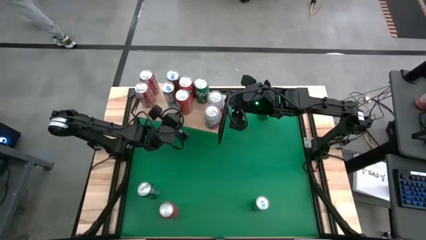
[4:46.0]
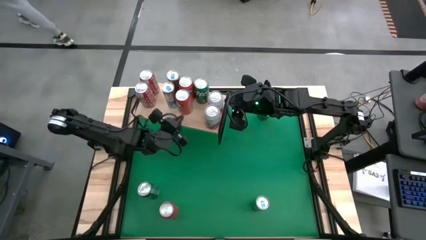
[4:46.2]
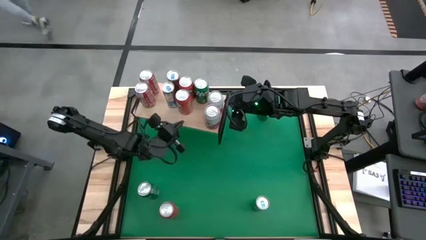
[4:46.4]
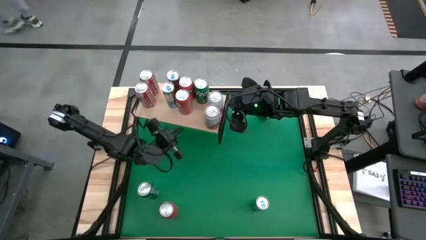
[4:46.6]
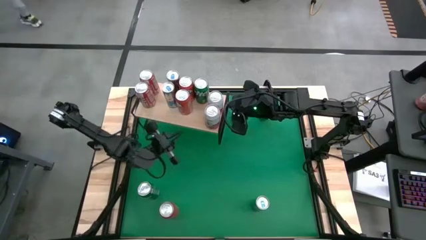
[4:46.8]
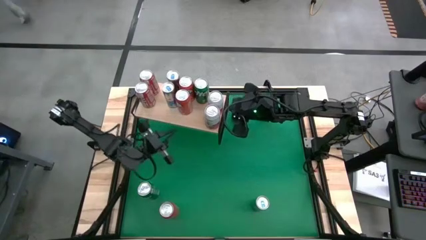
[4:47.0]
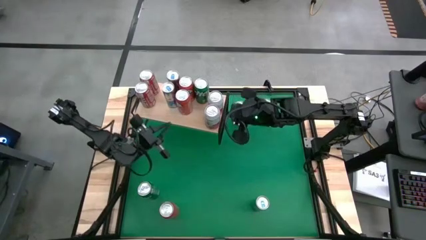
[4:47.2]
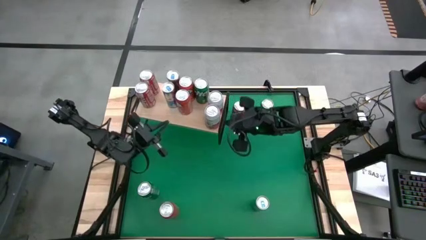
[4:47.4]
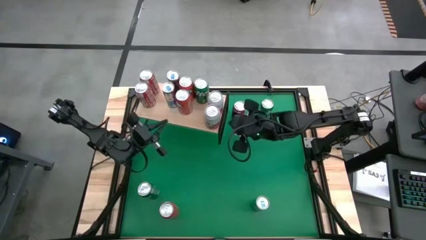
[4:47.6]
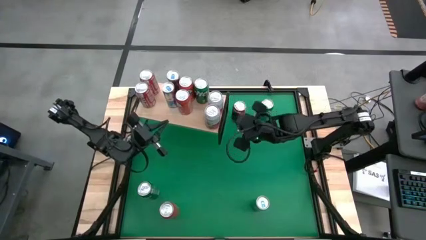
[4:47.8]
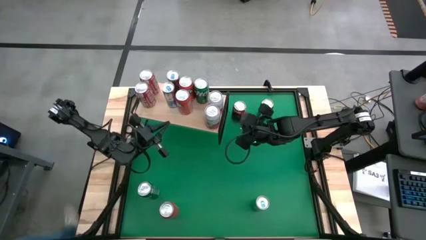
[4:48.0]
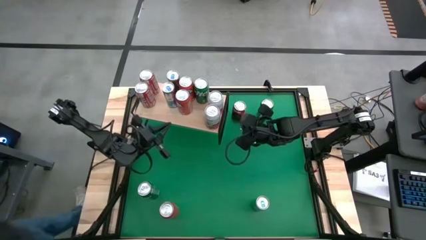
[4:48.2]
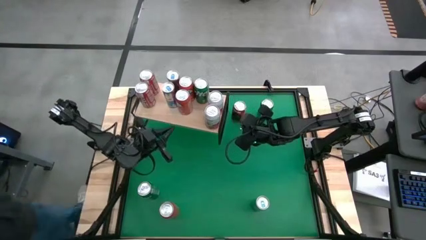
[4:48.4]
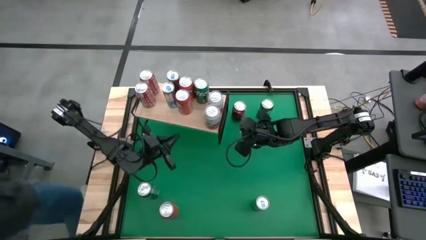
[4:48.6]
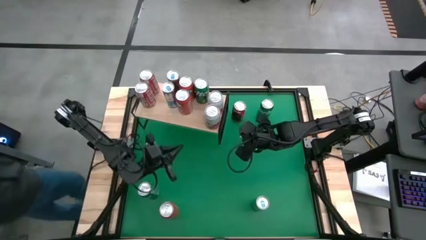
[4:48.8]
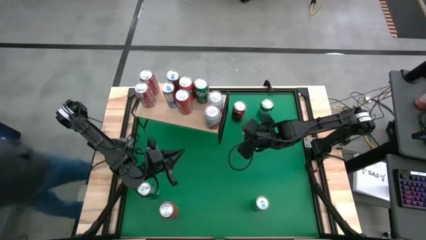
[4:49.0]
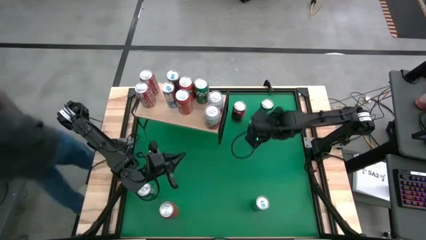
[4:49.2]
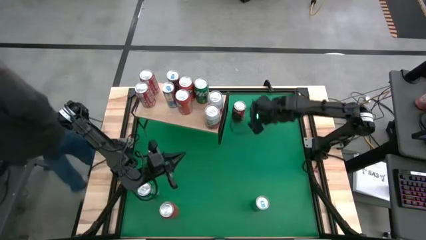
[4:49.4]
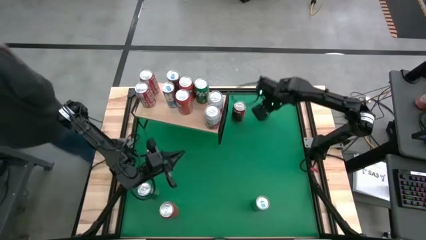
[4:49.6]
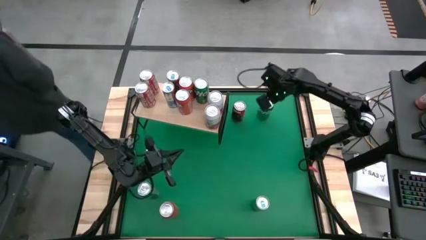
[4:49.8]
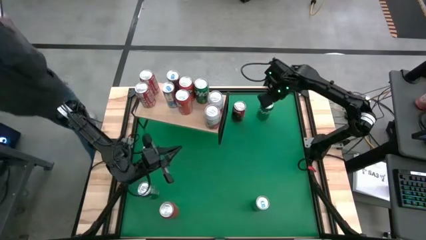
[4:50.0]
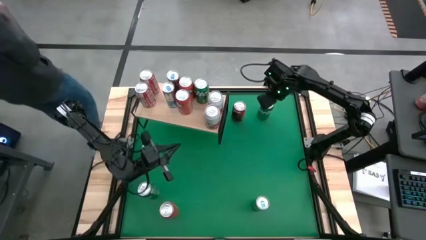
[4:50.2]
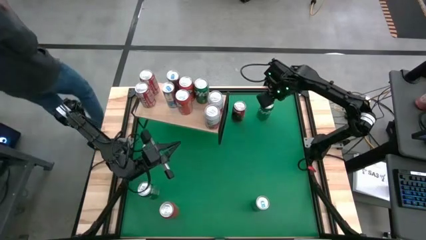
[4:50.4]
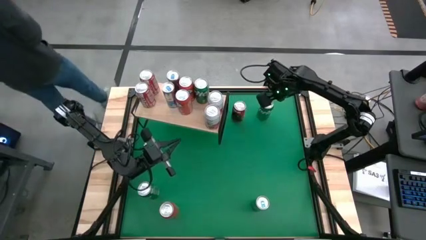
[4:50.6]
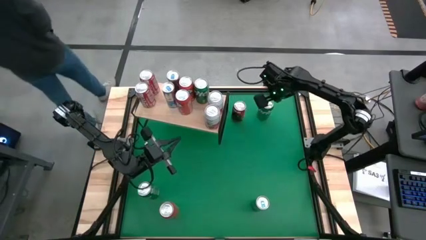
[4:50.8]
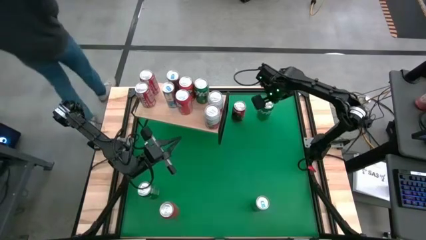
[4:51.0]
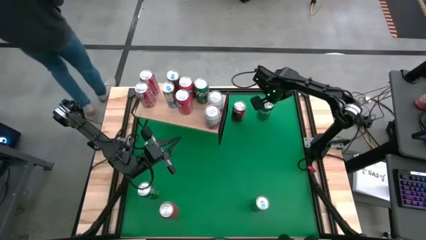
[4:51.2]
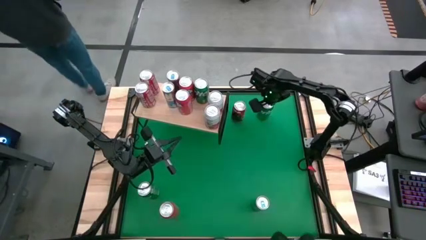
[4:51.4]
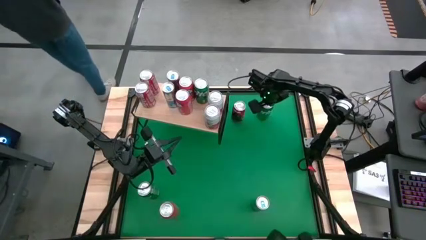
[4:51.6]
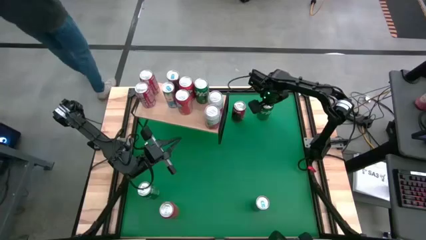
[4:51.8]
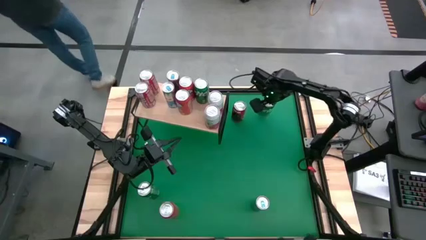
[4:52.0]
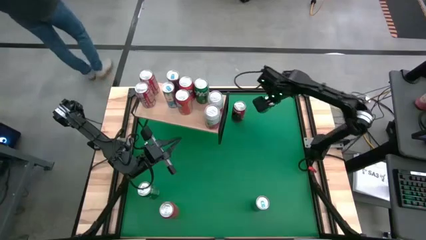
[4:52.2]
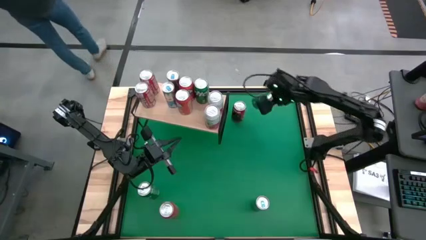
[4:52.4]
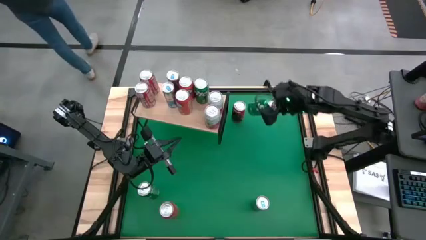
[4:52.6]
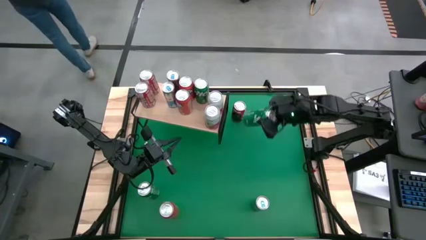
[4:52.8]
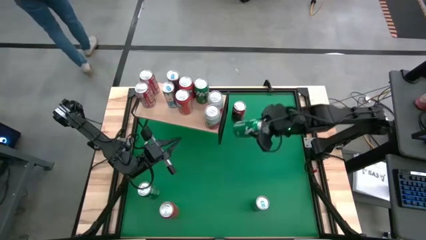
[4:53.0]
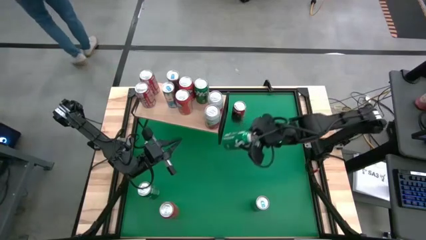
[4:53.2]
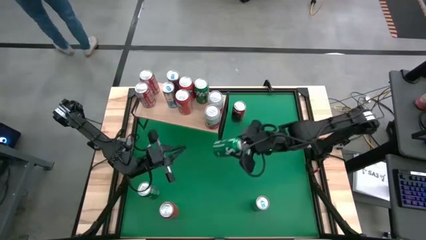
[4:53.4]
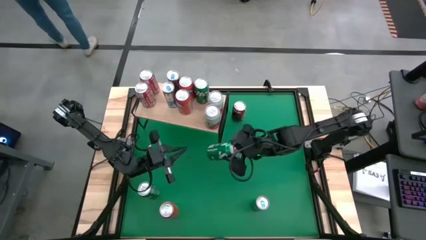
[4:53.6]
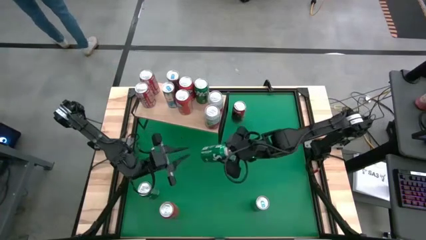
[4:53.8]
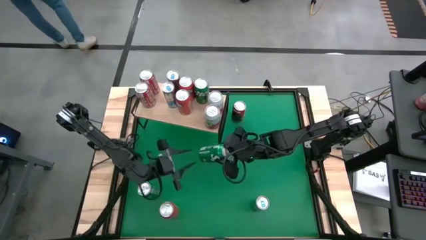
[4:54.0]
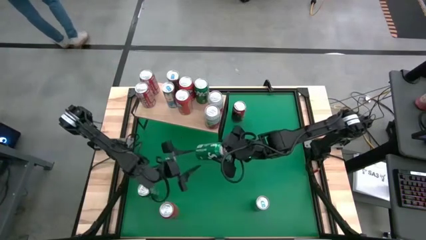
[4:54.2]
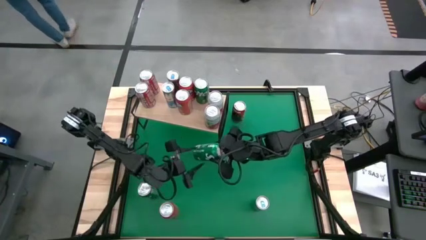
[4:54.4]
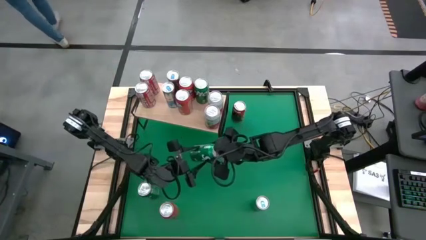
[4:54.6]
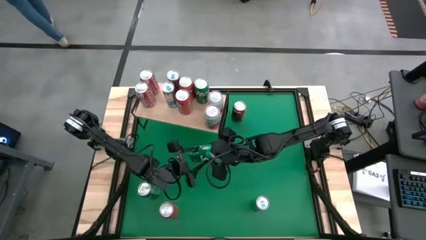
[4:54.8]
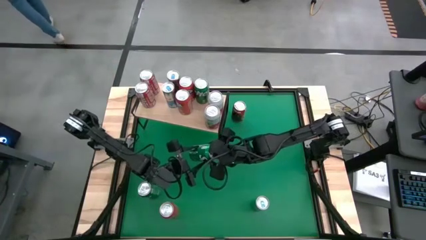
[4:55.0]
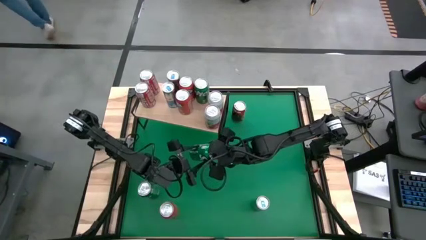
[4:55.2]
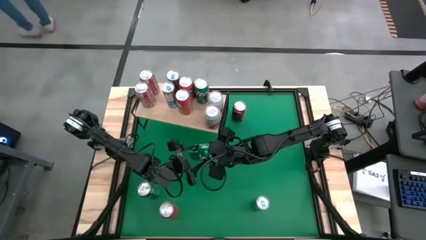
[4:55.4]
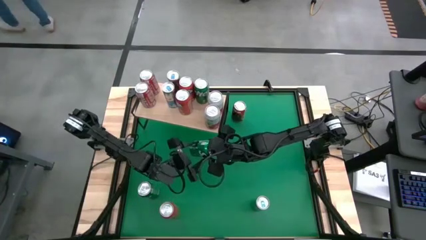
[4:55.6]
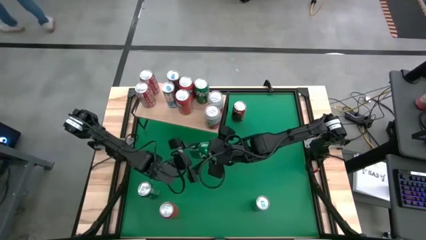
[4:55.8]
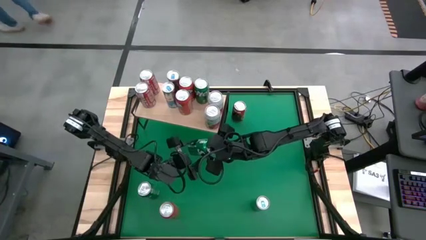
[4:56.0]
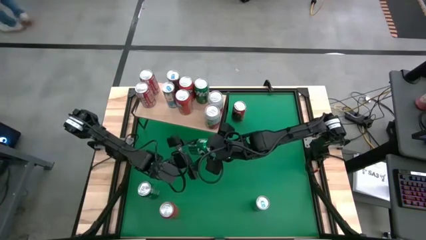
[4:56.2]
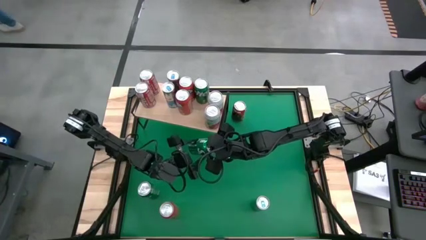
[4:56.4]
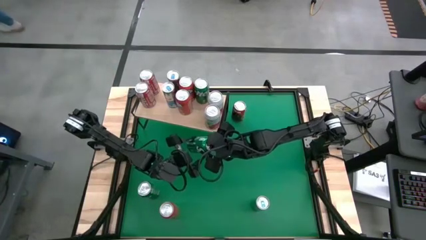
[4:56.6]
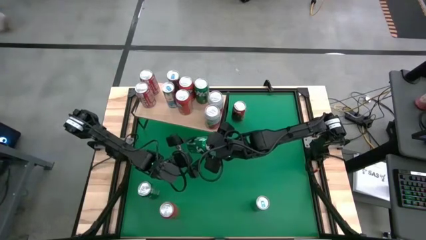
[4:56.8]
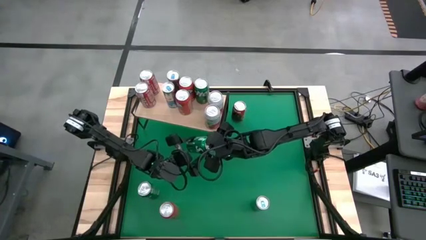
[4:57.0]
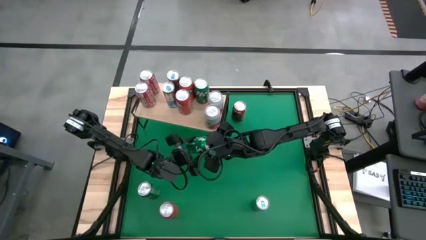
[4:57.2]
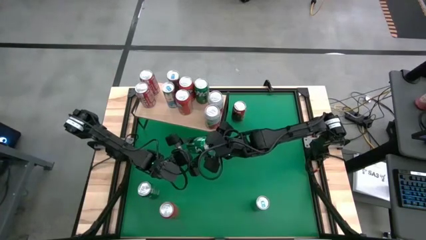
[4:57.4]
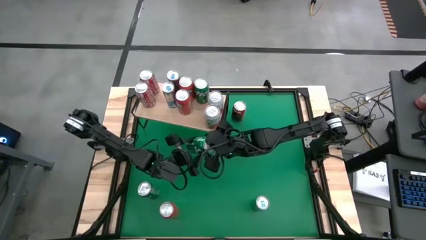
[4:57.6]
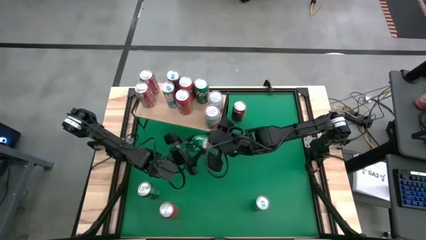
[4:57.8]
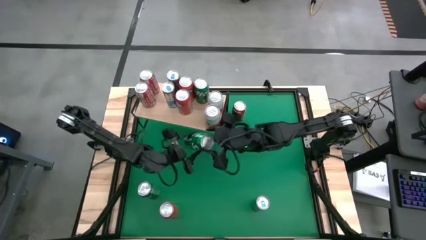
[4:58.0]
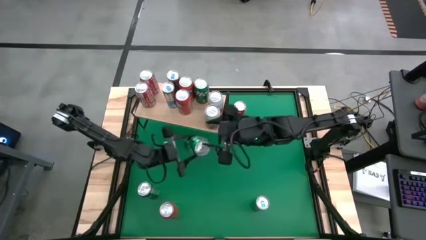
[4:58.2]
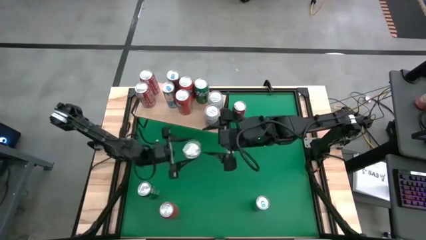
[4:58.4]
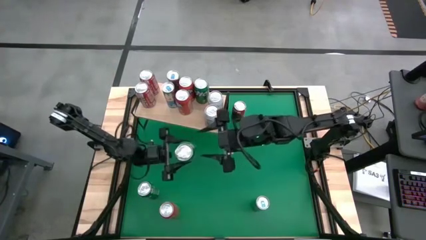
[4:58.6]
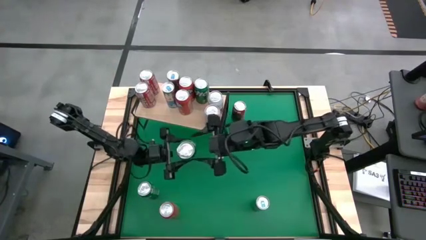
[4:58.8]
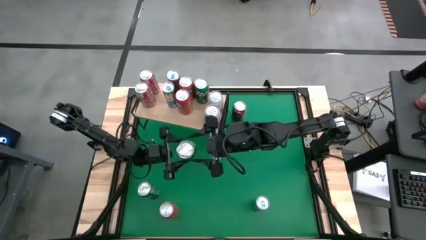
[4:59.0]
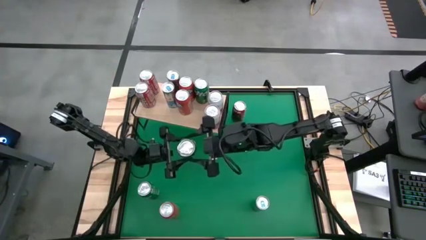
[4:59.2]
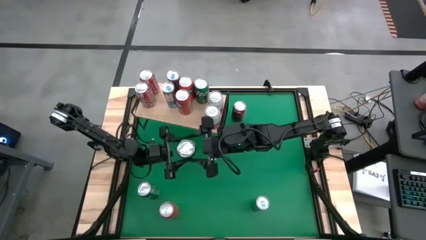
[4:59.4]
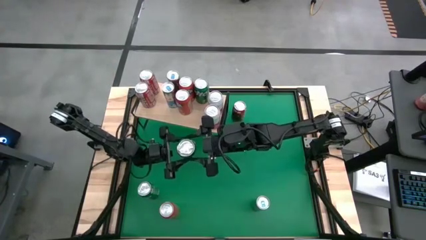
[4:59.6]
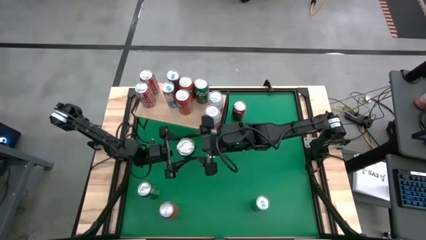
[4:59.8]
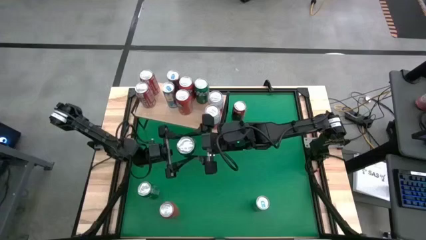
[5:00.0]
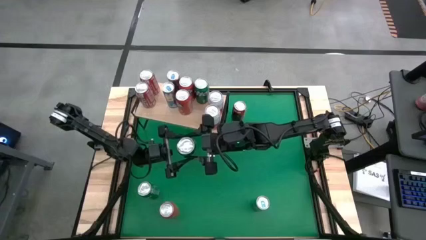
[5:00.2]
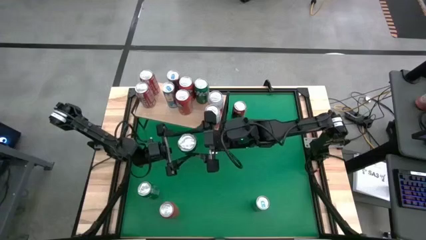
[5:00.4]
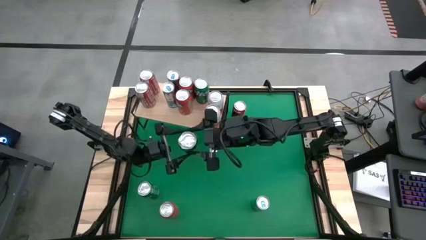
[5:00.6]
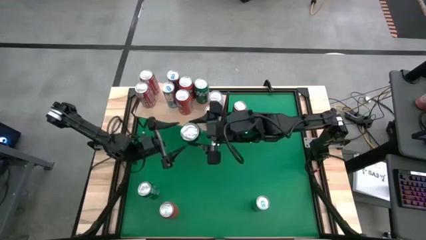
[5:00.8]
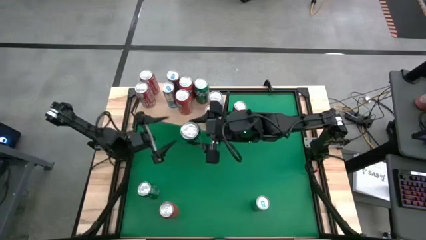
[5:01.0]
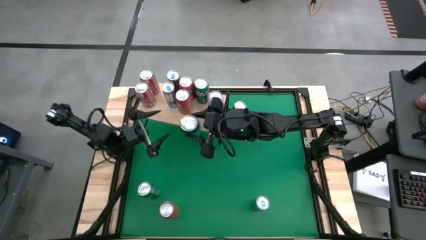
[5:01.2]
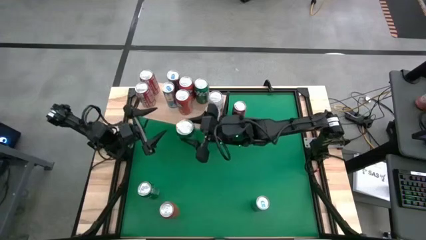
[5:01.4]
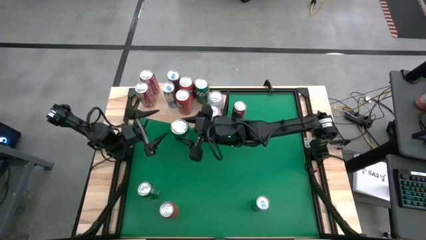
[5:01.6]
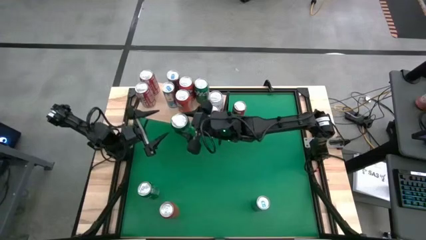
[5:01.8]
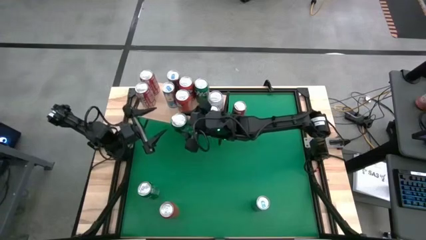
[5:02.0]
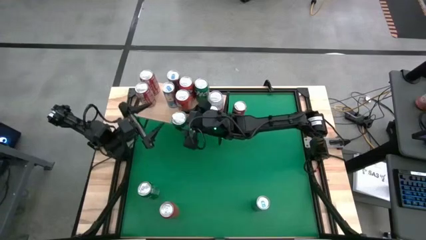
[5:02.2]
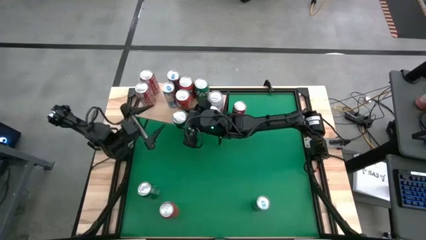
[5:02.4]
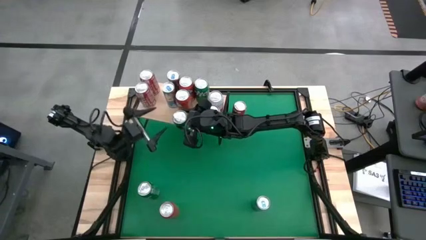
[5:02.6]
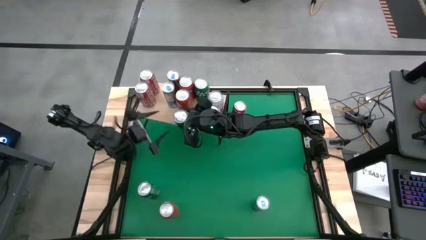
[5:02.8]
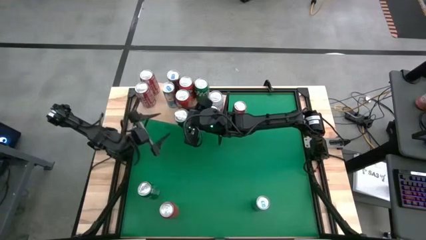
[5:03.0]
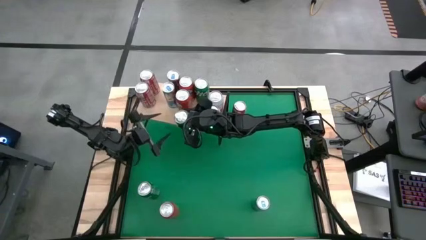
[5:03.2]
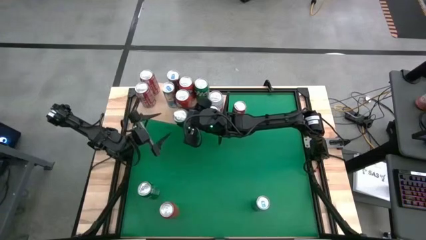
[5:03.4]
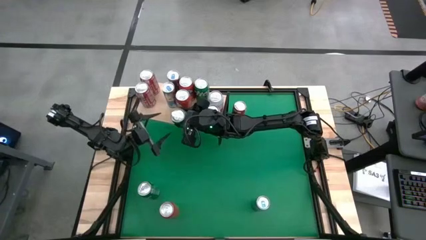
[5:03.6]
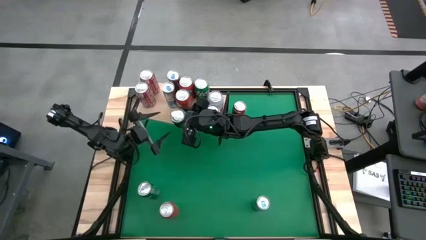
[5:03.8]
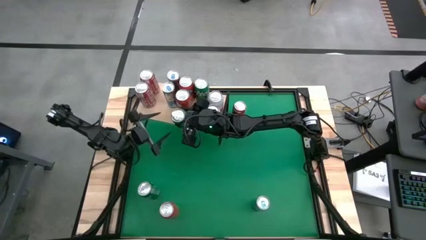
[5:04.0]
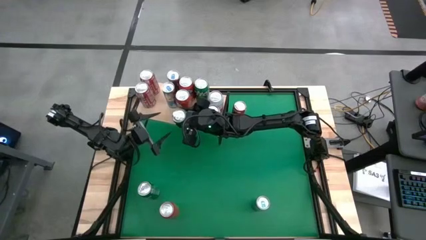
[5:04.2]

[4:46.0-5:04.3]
Task: Place canned beverage on shelf
Put the green soda can on the shelf aligned with the other green soda can
